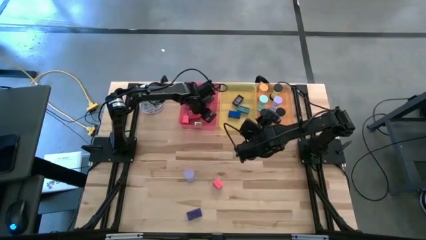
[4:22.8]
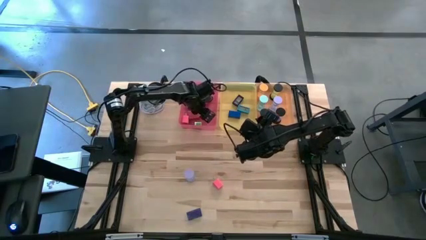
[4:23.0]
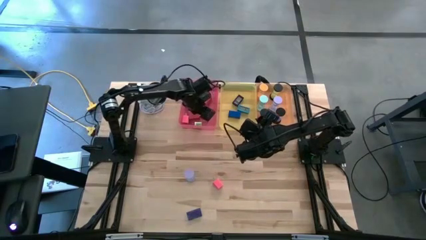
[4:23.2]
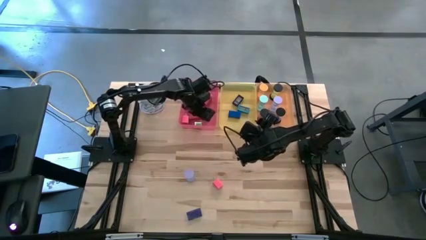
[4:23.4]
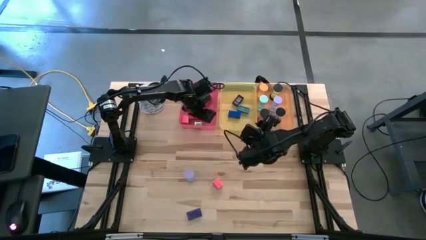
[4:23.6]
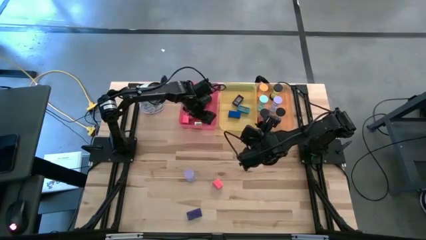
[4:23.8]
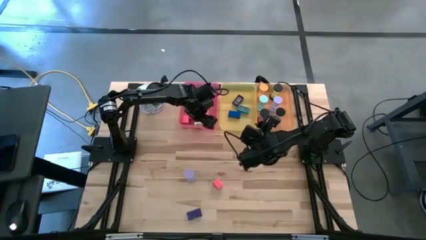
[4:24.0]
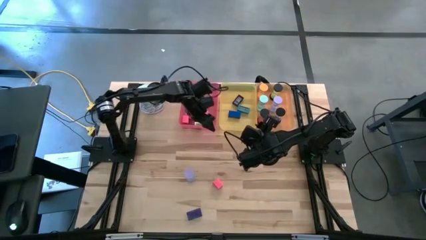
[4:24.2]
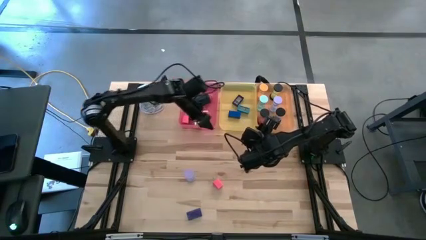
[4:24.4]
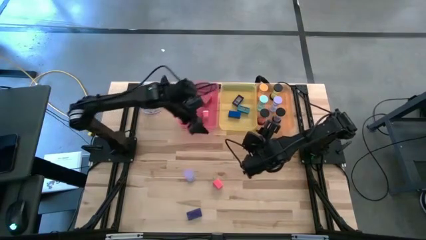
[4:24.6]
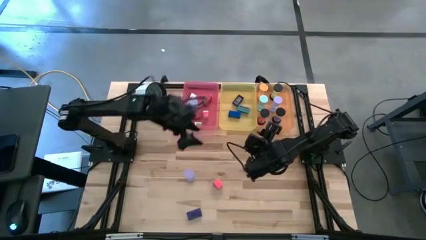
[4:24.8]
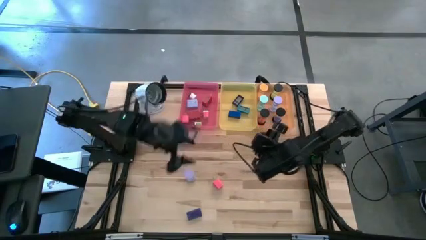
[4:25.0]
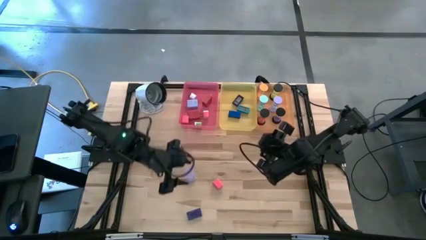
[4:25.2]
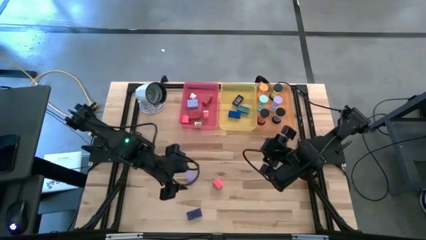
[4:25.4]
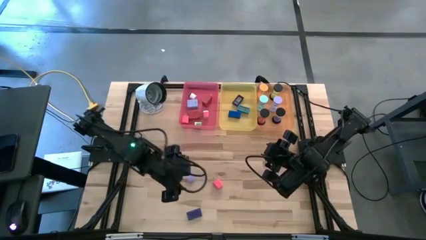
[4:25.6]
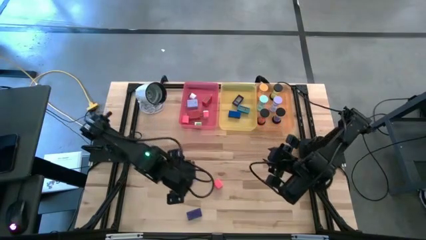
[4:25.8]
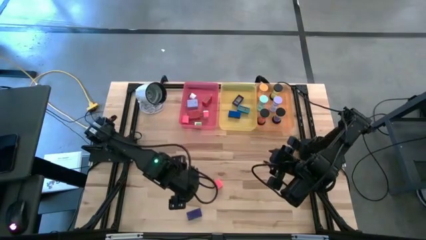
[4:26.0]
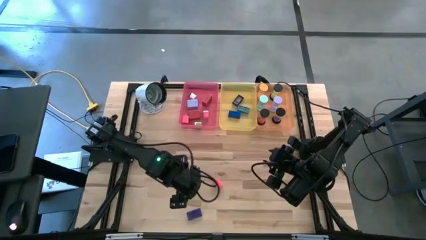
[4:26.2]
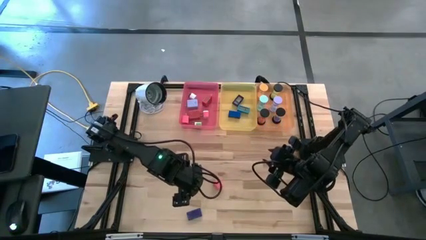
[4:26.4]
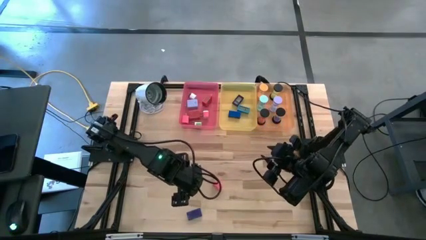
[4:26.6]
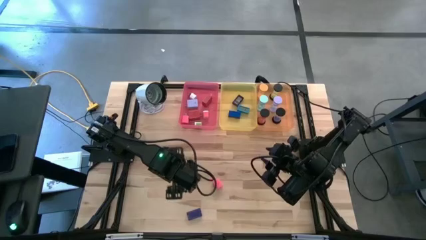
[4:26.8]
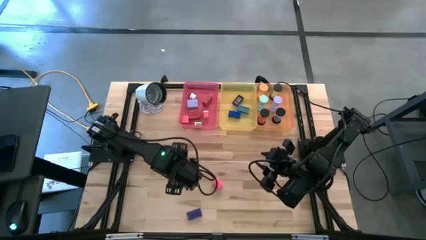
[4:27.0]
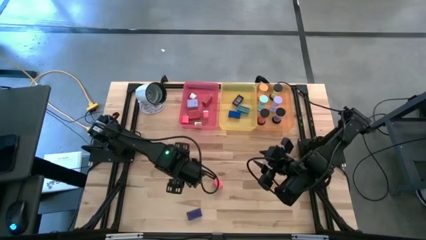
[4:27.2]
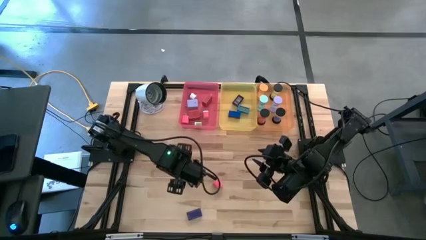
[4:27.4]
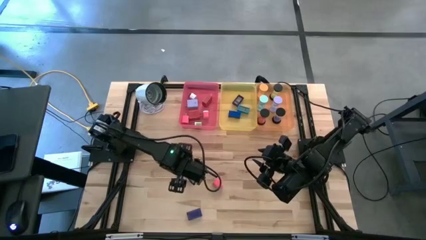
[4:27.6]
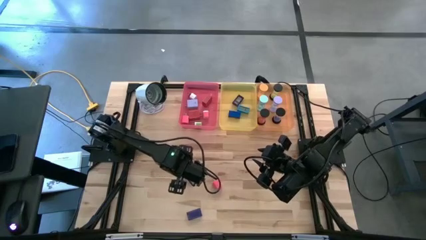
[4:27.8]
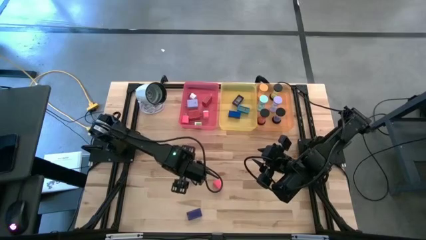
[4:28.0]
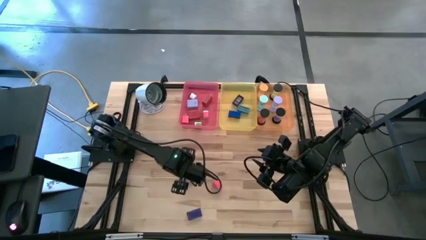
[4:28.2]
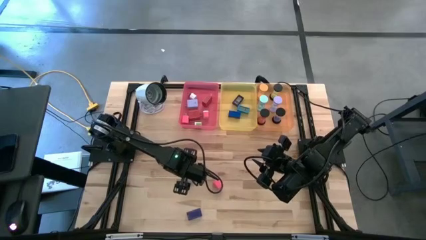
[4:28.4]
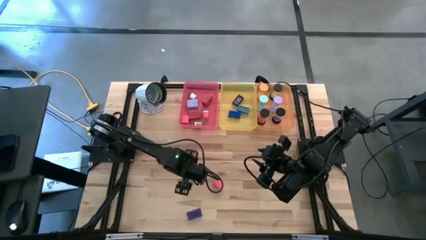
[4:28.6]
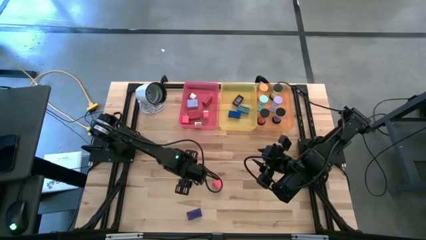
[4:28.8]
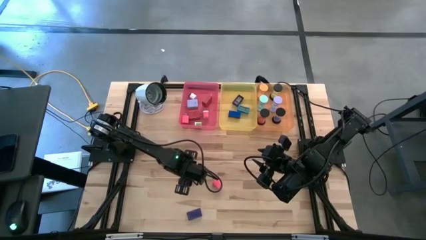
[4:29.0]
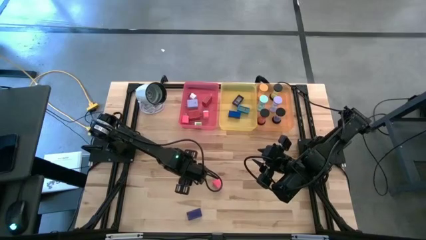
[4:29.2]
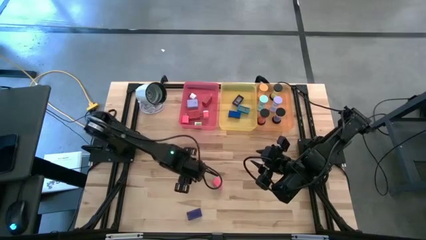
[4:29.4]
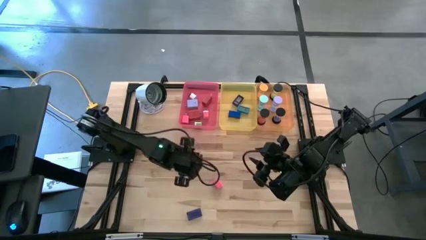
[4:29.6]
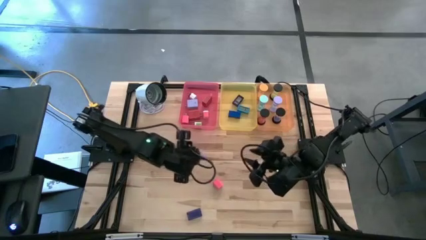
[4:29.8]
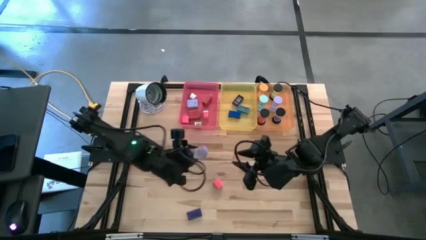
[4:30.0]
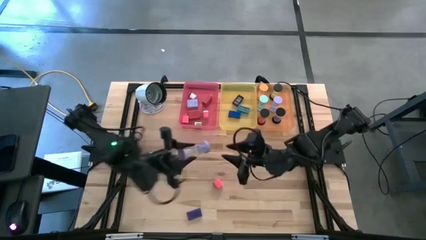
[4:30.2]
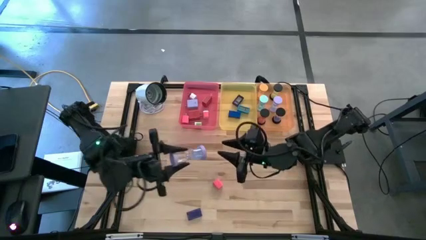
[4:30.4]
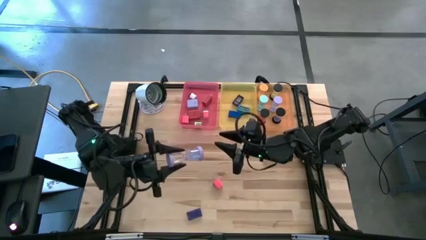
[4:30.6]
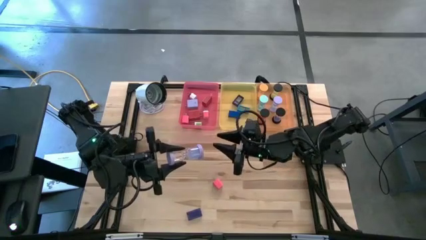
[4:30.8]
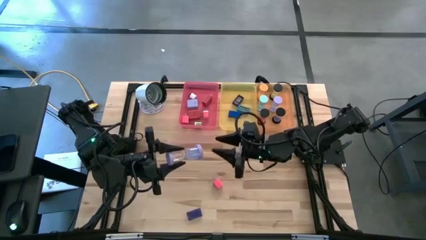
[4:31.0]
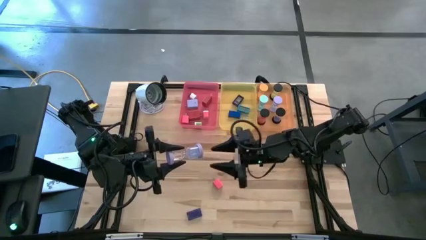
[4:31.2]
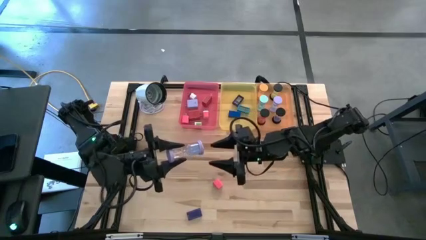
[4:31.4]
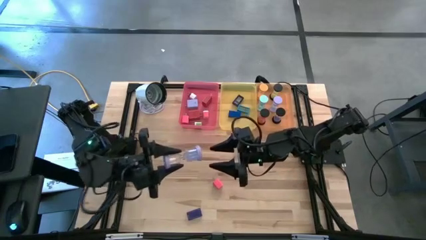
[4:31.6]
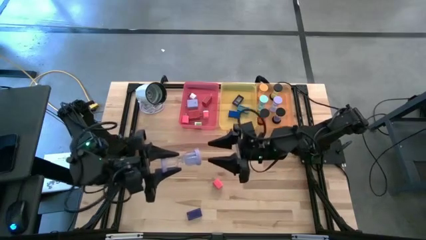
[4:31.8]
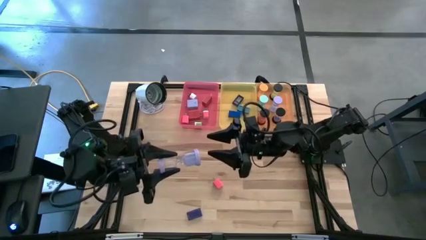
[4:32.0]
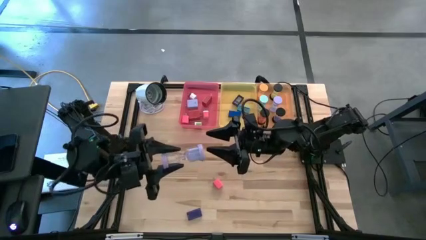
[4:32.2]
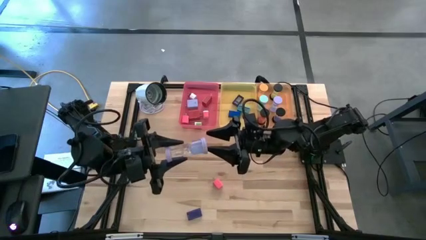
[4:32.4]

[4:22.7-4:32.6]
Task: Pick & Place Office items
Put the violet hourglass into the orange bin

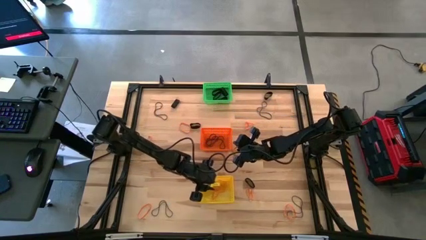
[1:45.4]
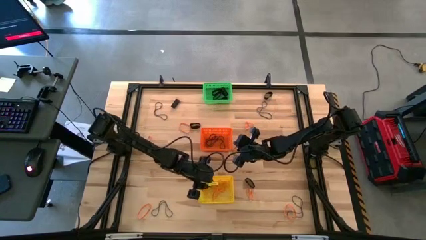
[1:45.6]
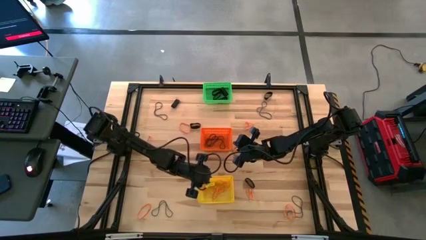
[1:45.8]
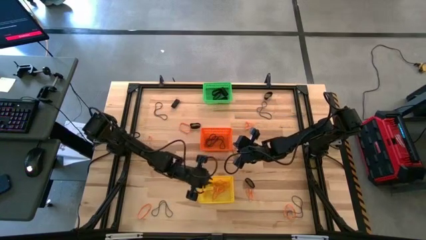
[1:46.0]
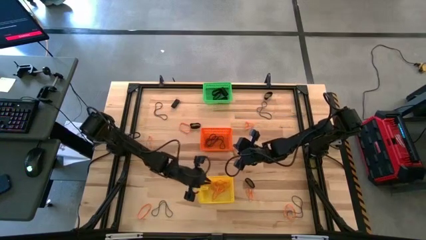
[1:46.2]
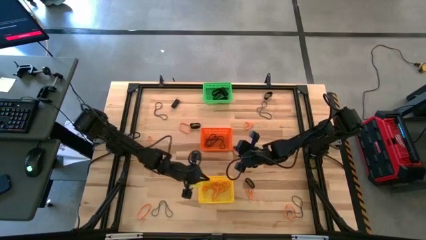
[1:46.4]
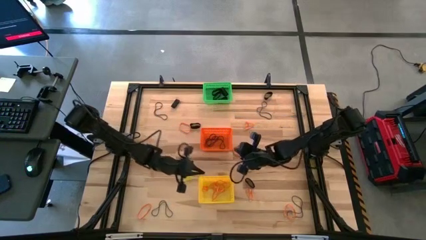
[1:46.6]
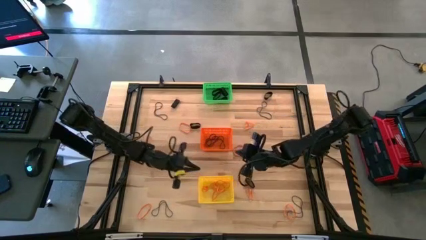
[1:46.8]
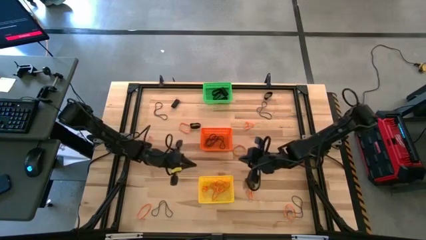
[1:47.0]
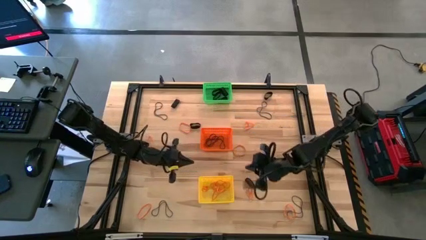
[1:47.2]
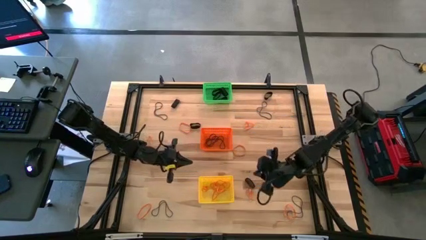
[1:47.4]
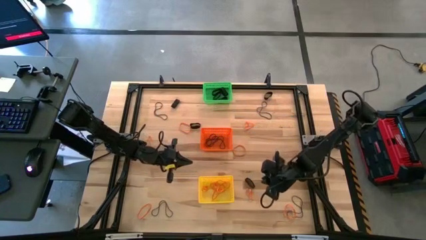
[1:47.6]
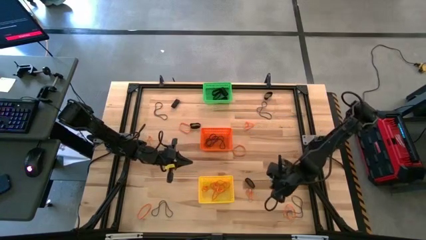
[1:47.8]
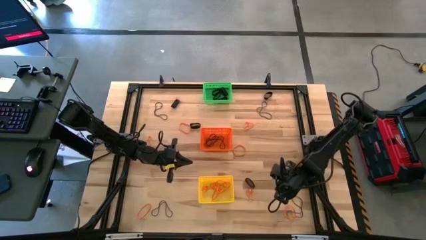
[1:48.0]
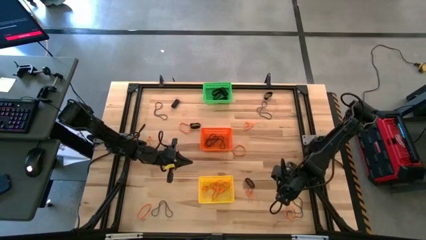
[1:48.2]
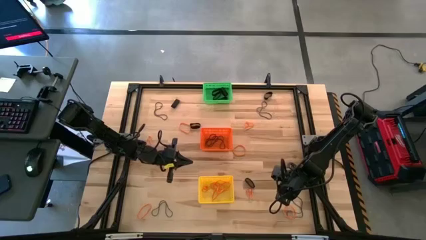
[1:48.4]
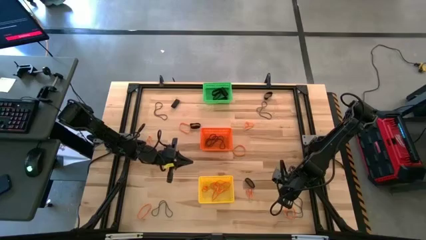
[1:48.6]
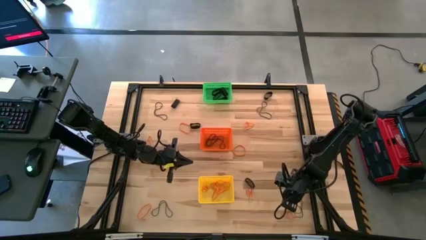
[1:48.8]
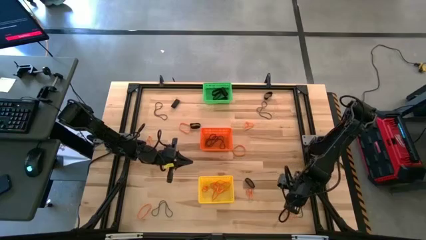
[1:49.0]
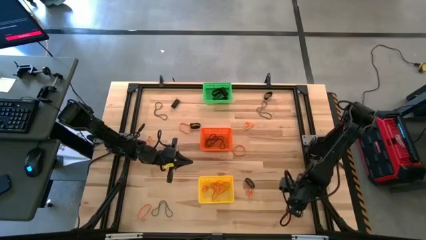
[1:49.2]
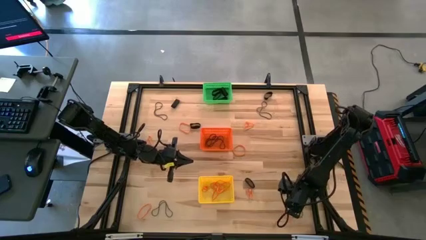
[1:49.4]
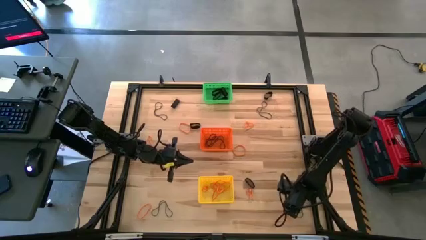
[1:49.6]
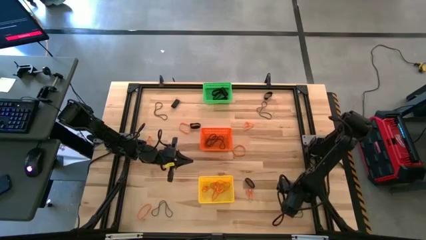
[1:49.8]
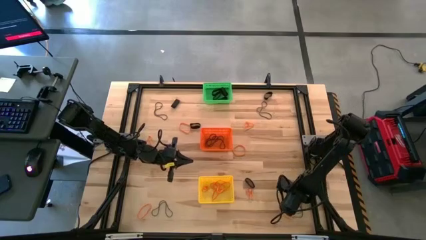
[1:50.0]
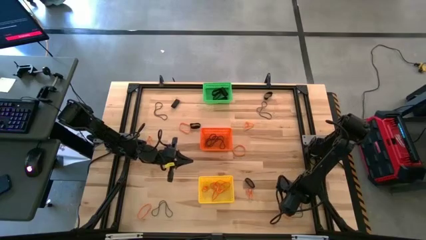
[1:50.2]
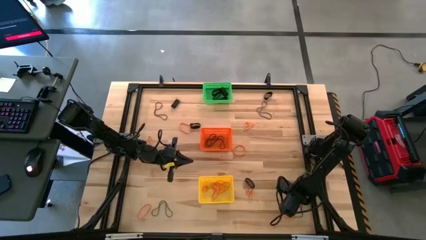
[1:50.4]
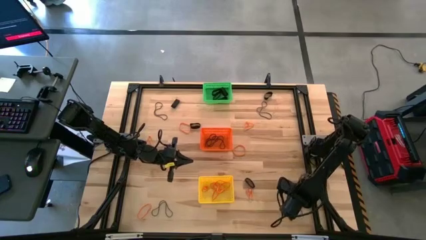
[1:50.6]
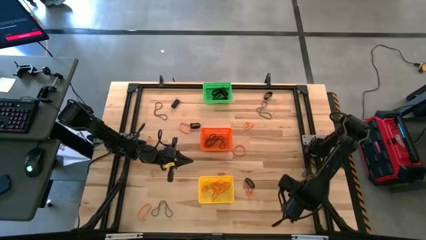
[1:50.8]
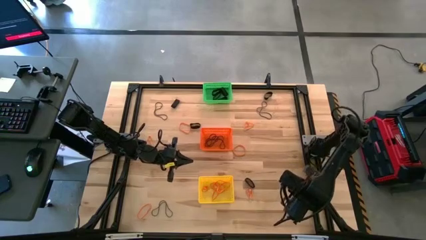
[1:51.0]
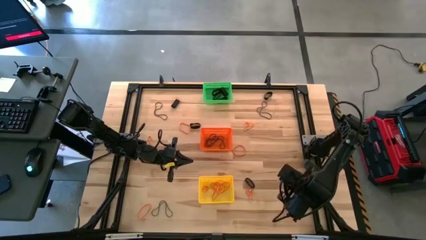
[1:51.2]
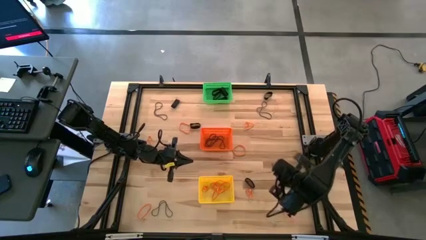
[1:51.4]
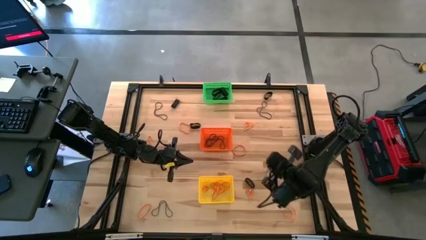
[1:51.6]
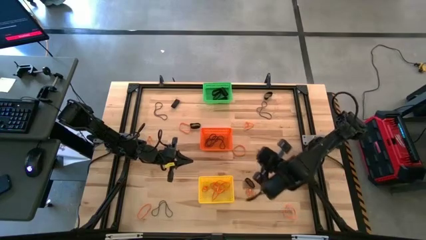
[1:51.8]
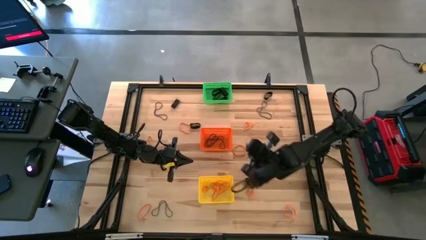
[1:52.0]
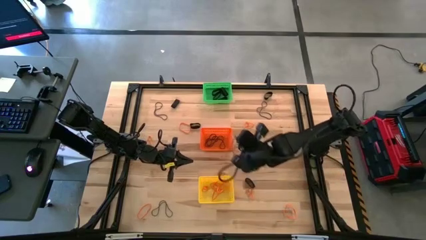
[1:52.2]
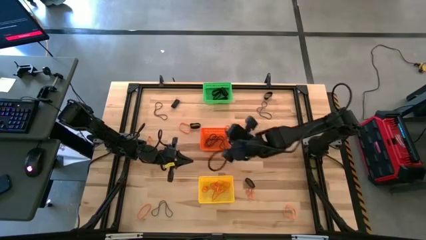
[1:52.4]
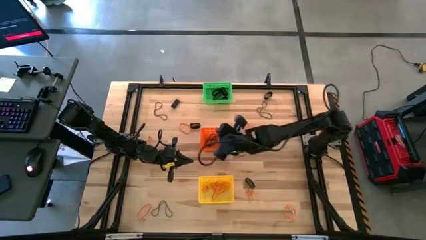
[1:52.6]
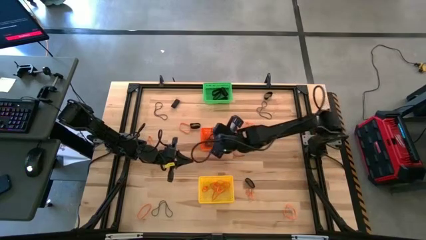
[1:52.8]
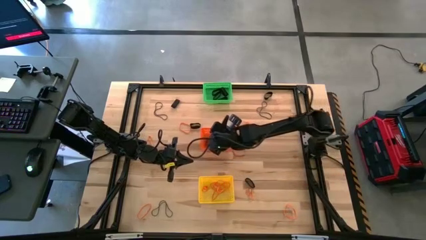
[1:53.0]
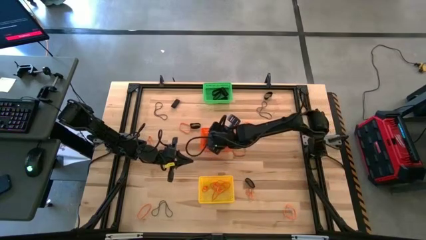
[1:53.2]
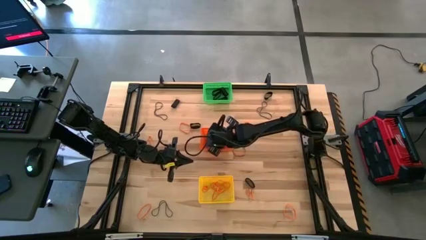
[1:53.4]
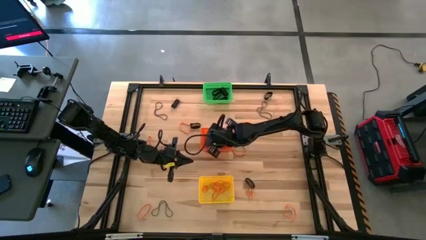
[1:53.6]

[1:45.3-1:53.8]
Task: Sort rubber bands into baskets
Put the purple rubber band into the orange bin
